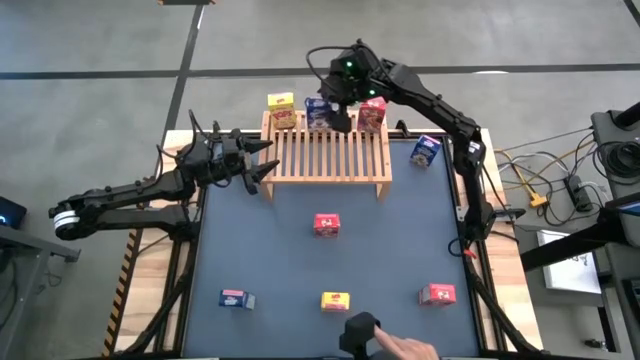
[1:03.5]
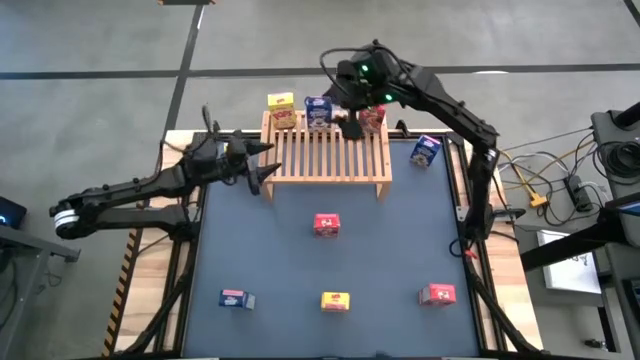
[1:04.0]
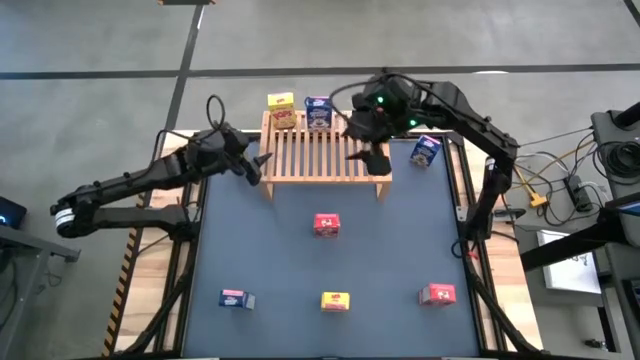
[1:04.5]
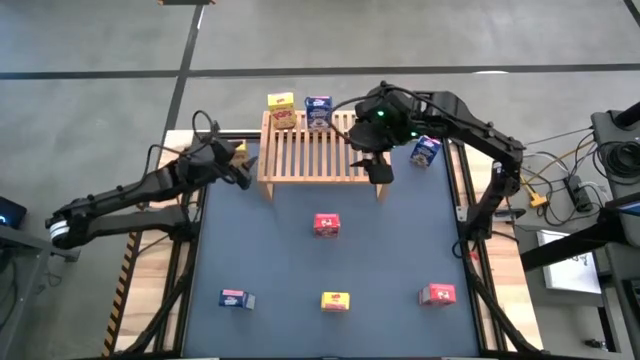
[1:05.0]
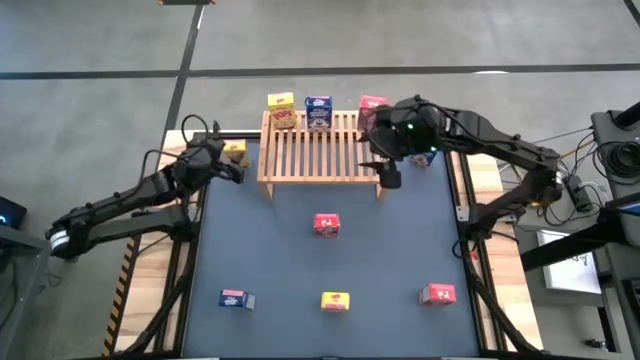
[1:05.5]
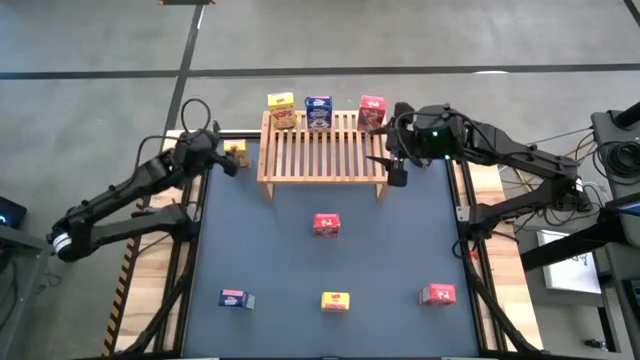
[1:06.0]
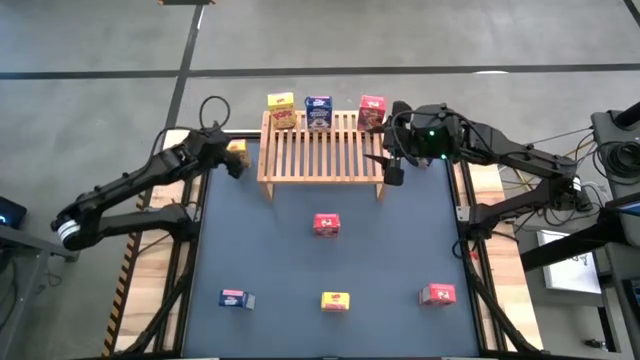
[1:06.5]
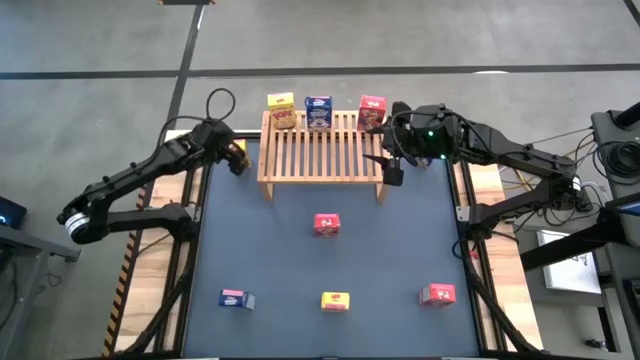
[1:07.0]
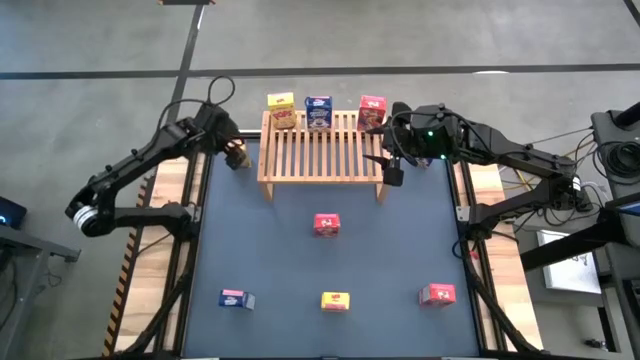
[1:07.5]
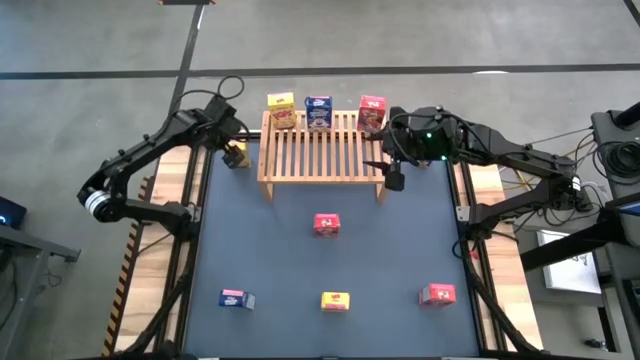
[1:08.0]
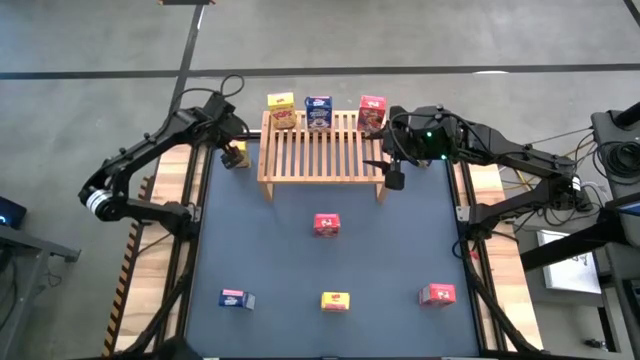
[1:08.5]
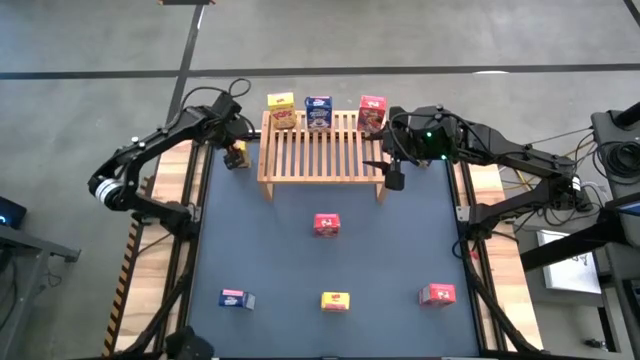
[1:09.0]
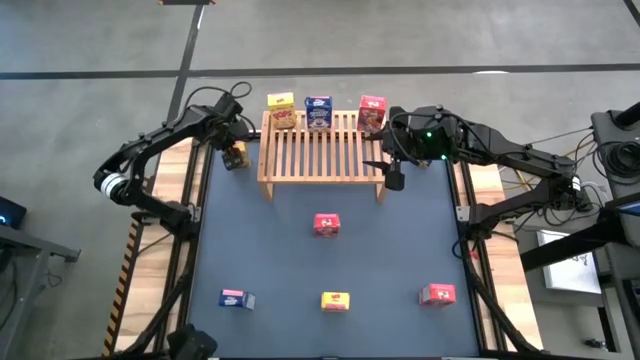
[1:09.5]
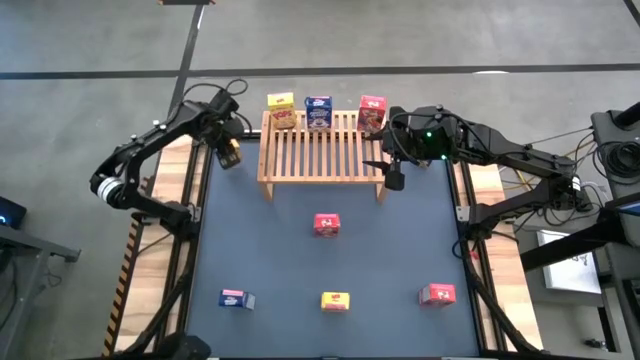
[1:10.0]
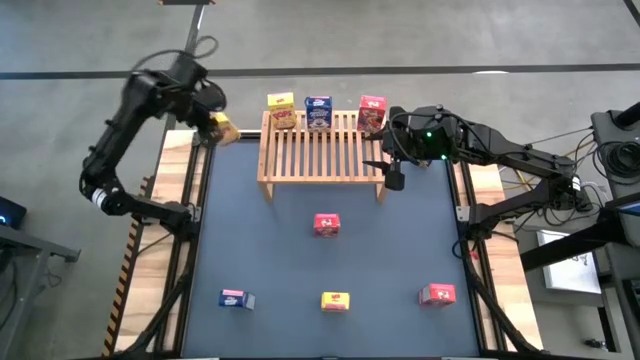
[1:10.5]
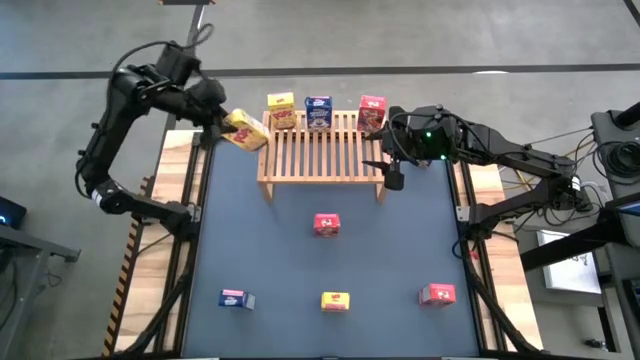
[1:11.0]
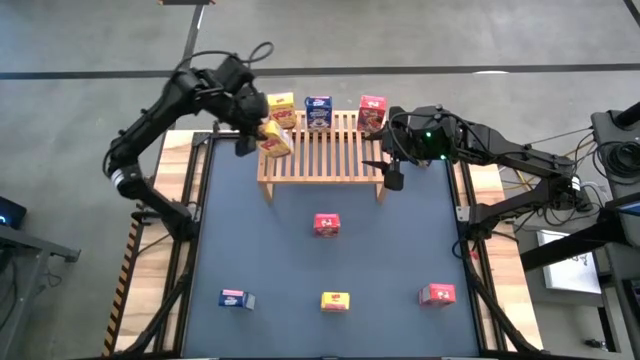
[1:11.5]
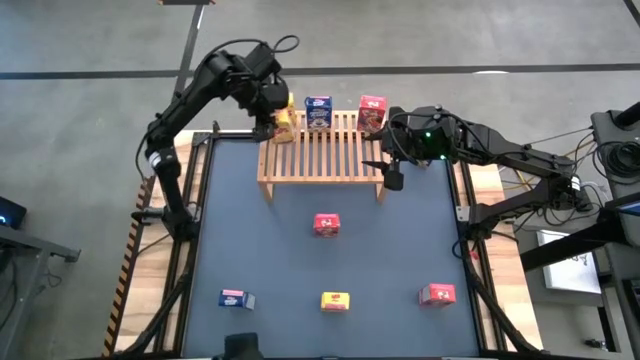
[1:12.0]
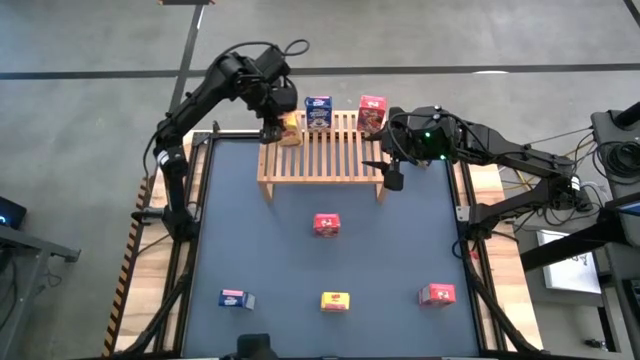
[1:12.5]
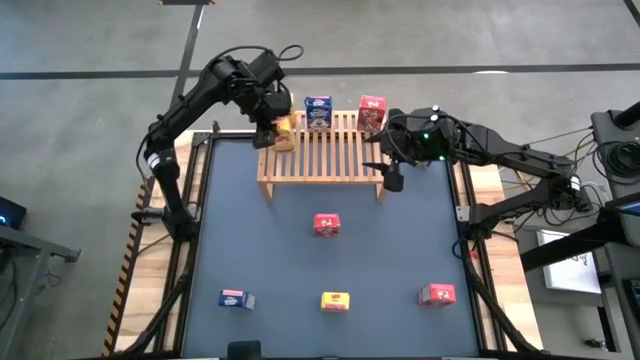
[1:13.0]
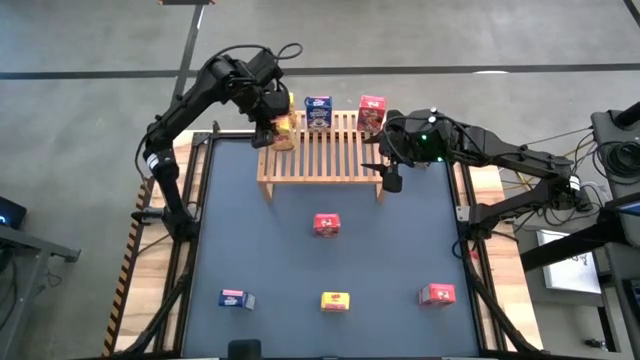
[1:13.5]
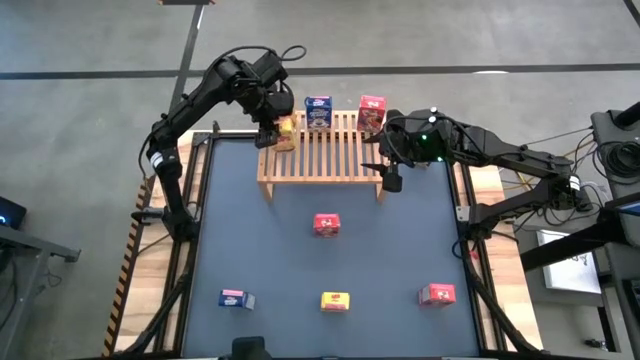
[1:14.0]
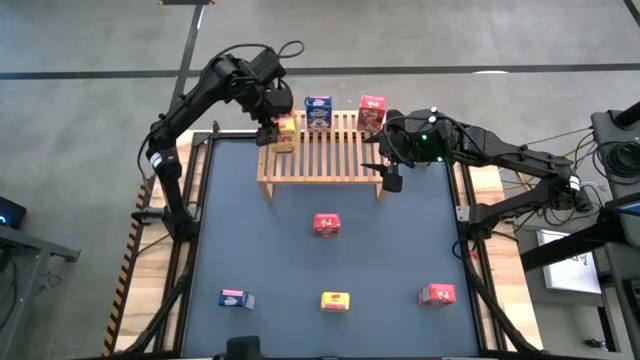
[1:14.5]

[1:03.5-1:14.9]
Task: Stack cereal on shelf
Put the top yellow cereal box on the shelf aligned with the other yellow cereal box

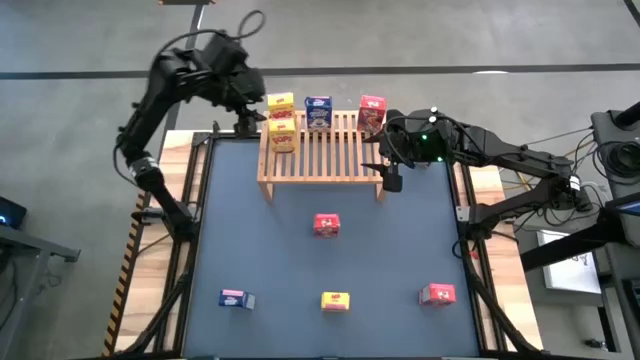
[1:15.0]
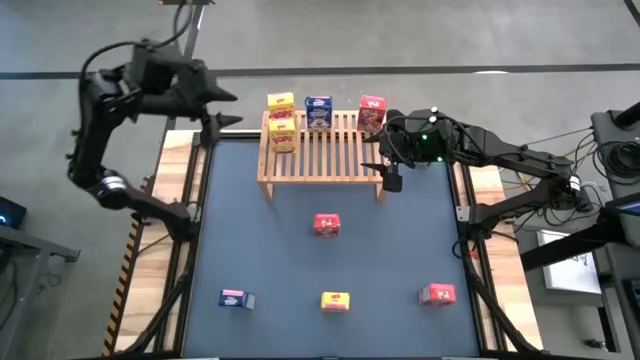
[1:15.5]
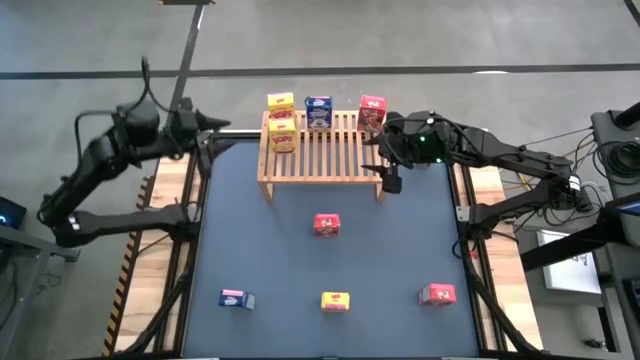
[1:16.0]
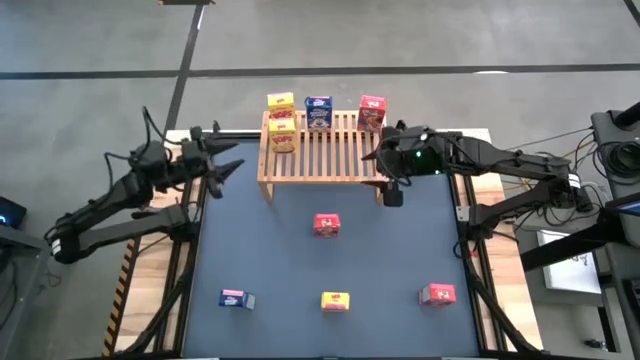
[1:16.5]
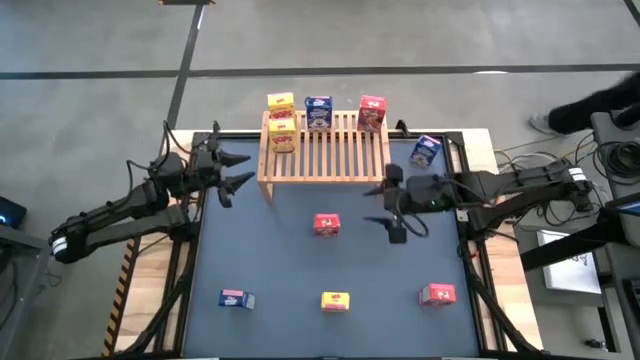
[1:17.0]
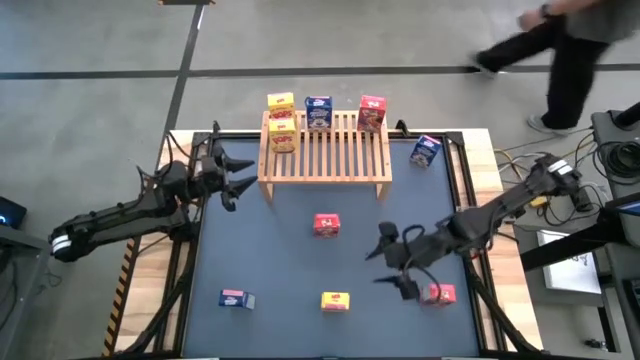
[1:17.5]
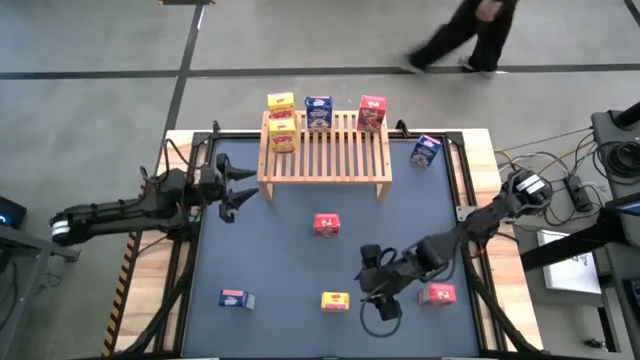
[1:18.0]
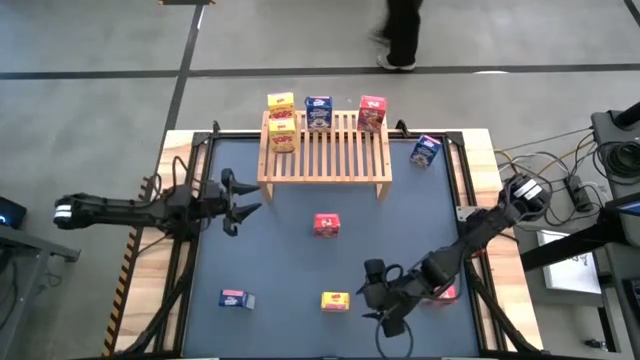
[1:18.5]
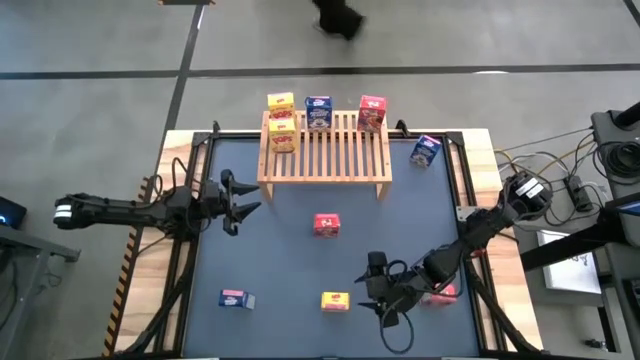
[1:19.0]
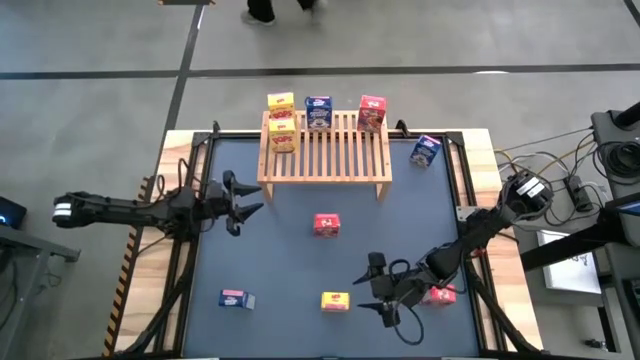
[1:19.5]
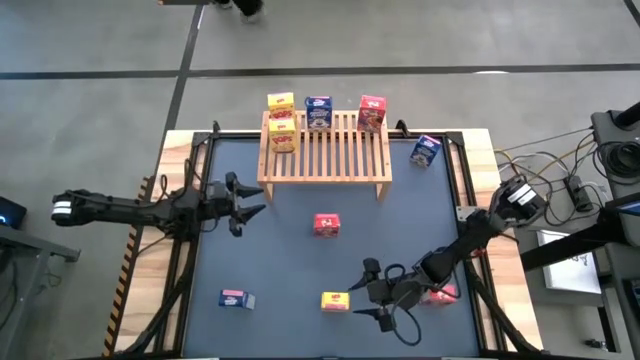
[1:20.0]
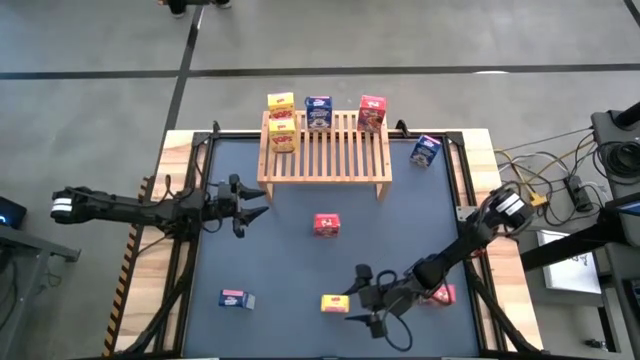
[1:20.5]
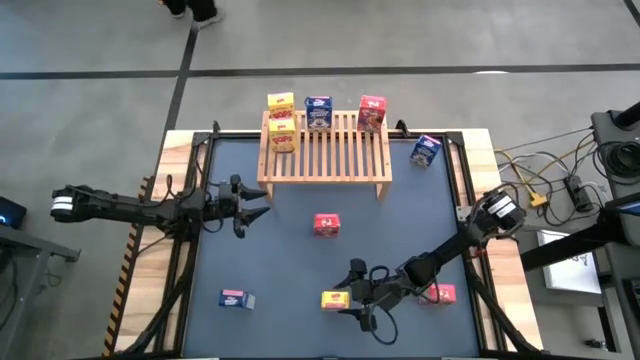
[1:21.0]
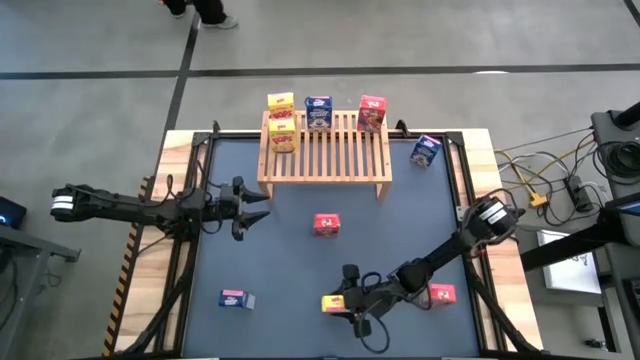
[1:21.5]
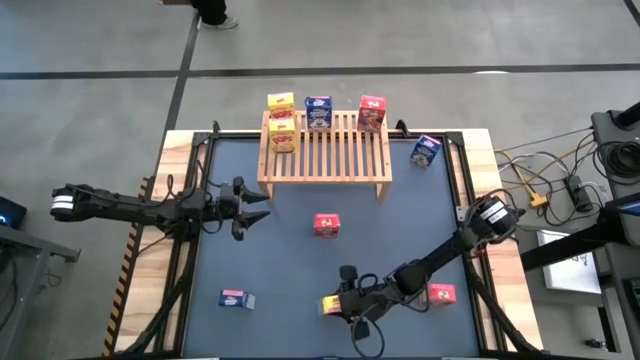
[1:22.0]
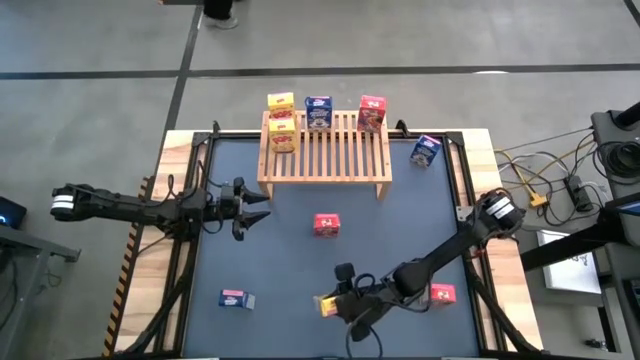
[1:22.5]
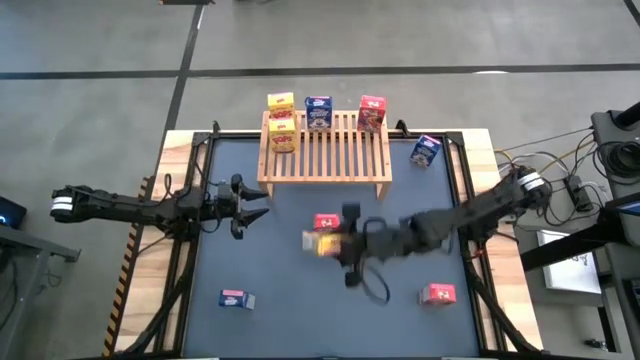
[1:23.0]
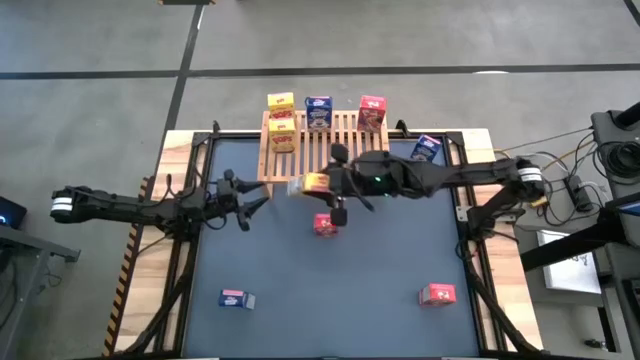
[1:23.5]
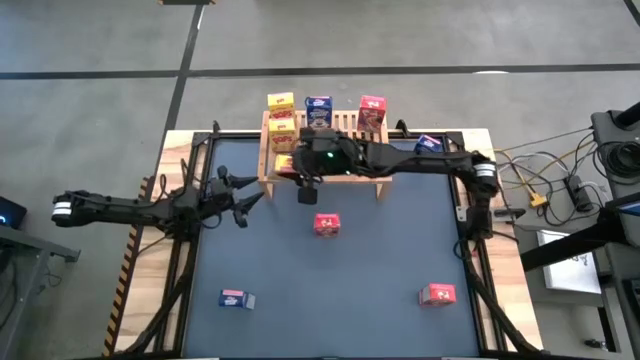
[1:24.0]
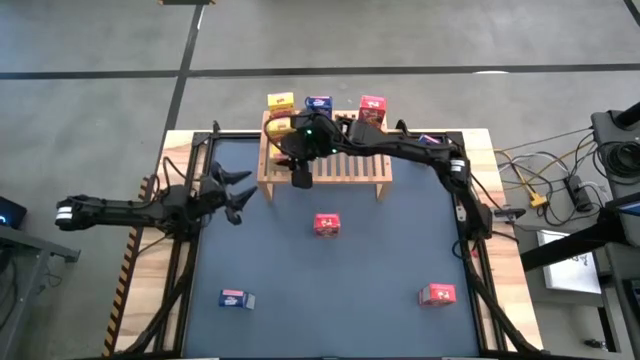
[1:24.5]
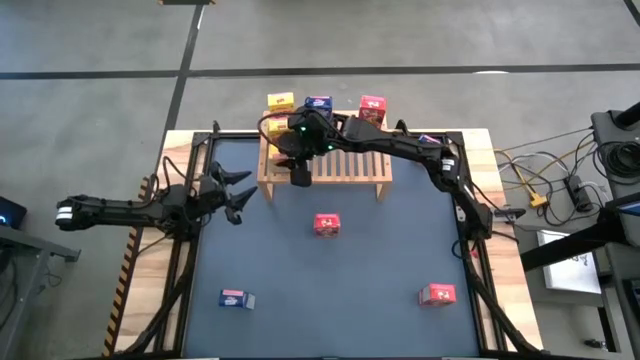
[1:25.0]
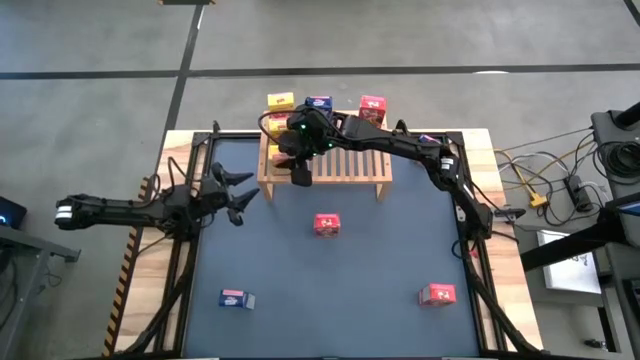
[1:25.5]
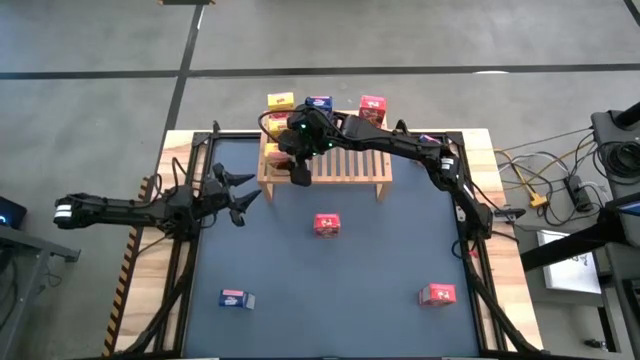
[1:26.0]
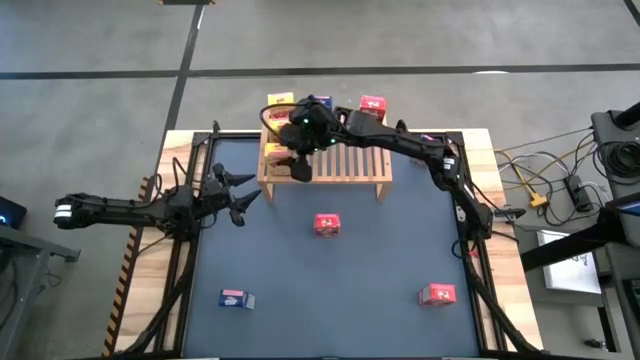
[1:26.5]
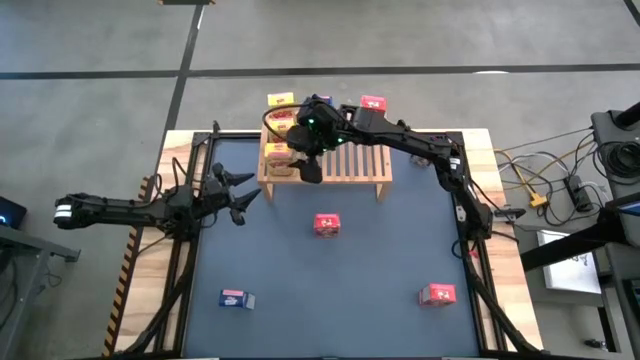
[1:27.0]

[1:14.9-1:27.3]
Put the yellow cereal box on the shelf aligned with the other yellow cereal box
